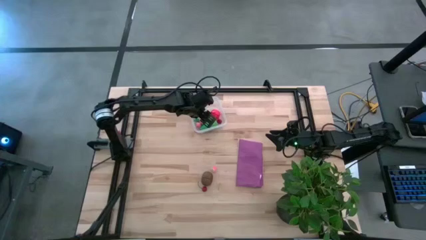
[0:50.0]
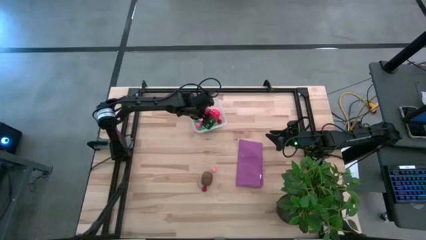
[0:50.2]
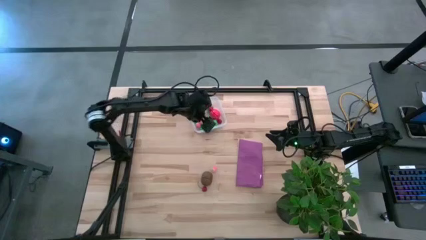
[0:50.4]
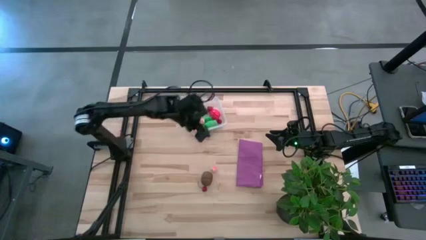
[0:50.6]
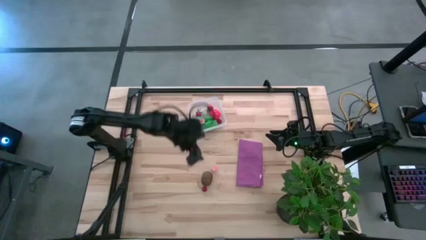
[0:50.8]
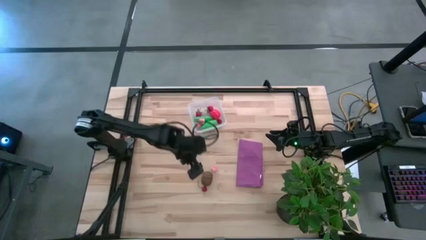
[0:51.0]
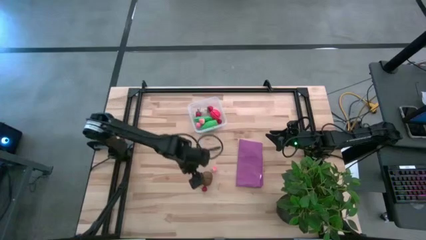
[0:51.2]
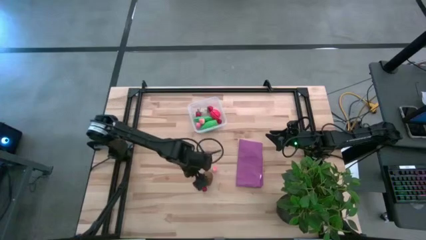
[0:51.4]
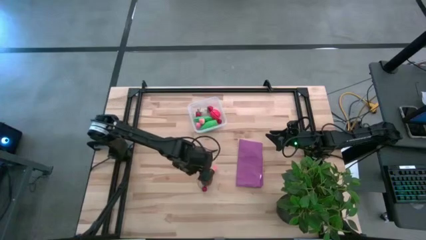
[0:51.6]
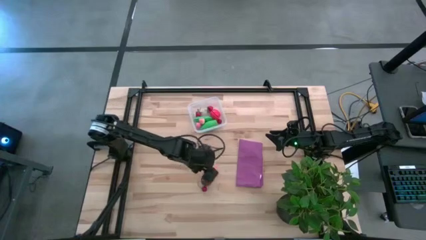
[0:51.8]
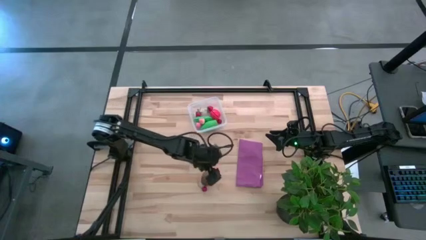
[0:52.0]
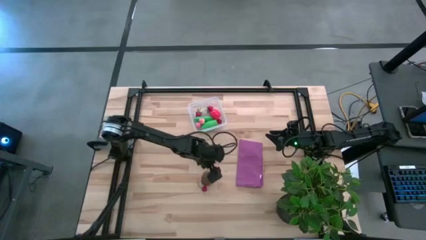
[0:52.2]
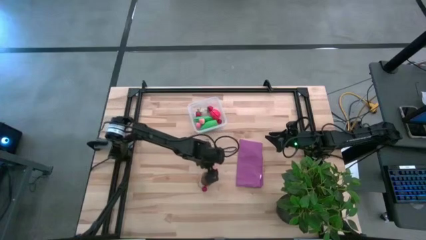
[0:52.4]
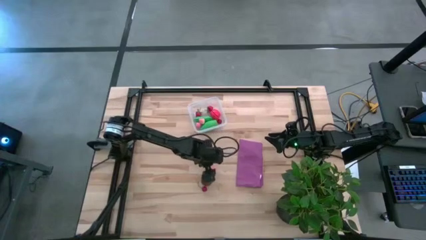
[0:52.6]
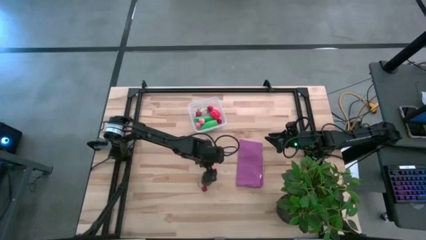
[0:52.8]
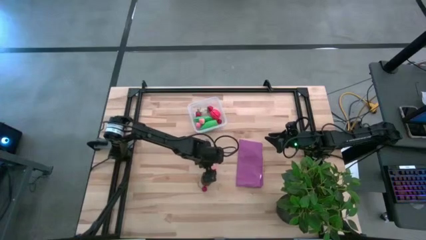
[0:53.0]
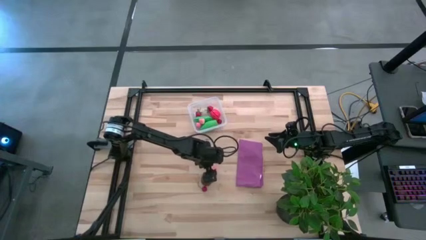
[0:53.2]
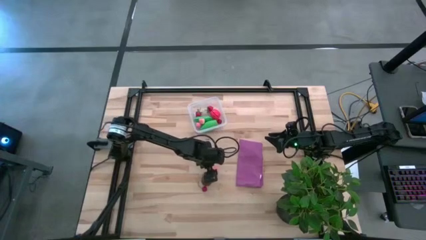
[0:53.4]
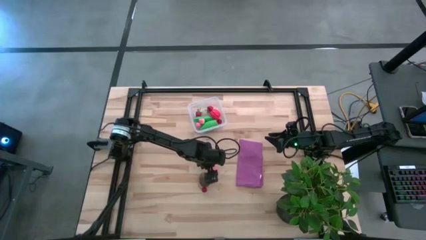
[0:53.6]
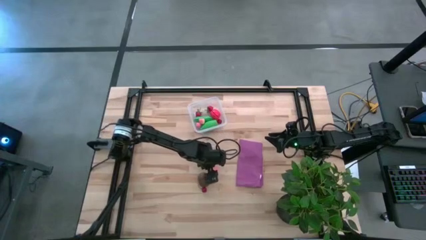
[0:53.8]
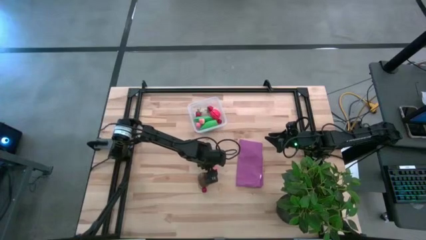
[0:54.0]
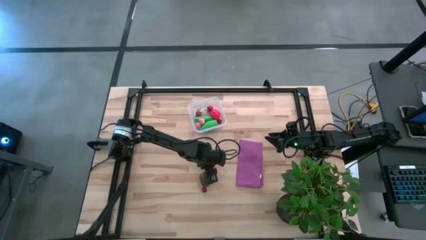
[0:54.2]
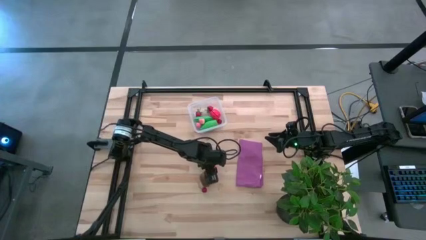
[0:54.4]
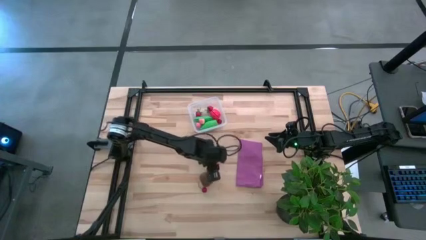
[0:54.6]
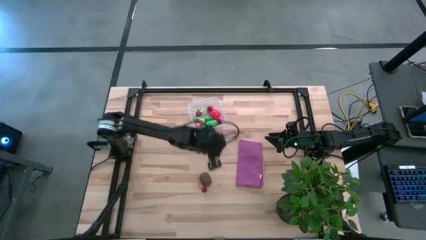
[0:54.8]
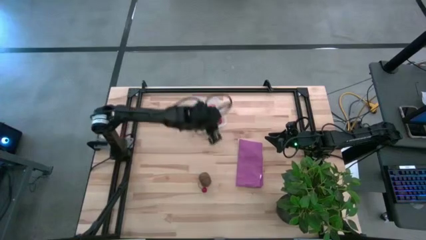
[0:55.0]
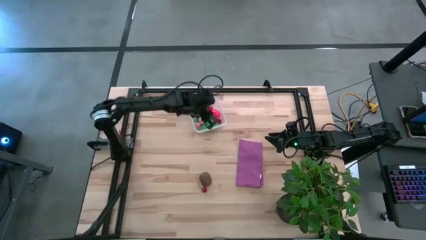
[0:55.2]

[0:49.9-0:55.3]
Task: Pick and placing Produce into tupperware
Put the pink peach into the white bin

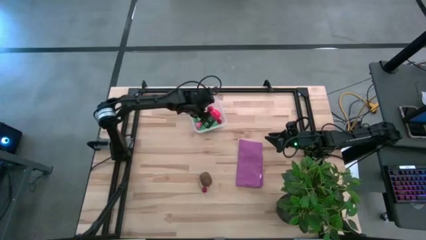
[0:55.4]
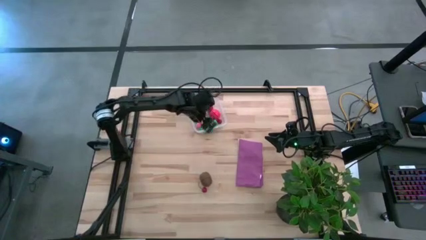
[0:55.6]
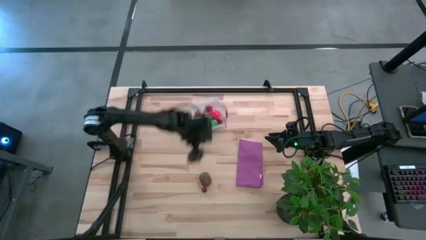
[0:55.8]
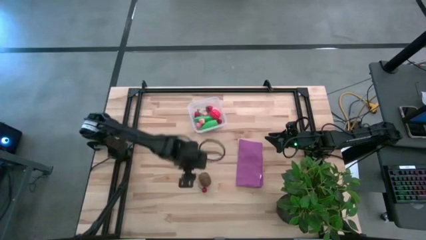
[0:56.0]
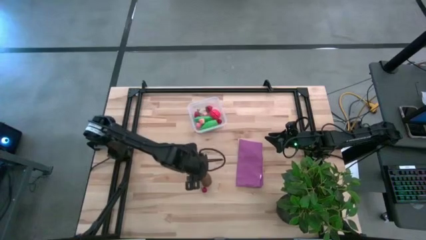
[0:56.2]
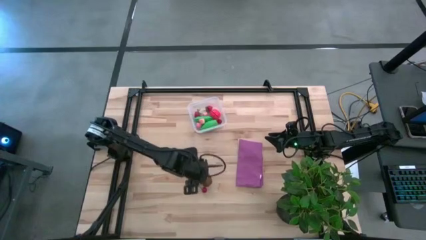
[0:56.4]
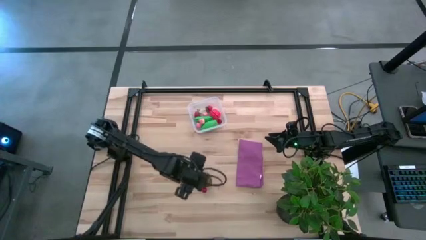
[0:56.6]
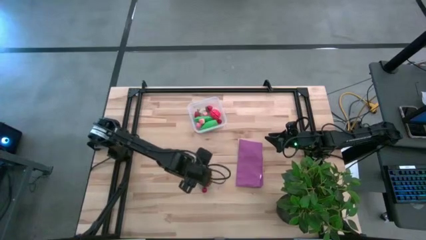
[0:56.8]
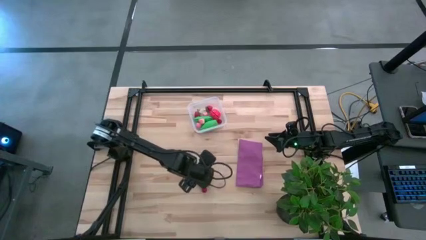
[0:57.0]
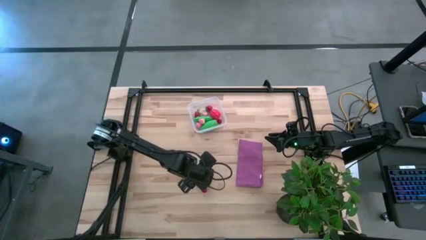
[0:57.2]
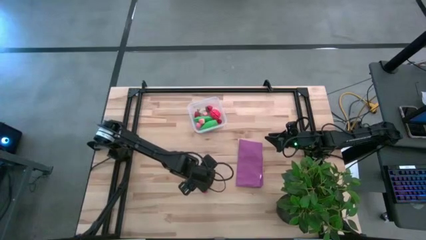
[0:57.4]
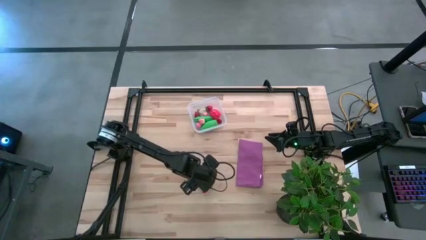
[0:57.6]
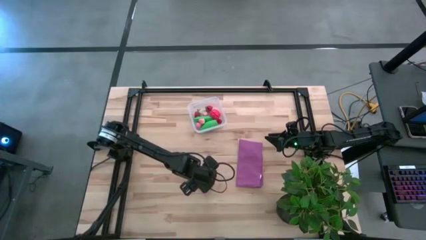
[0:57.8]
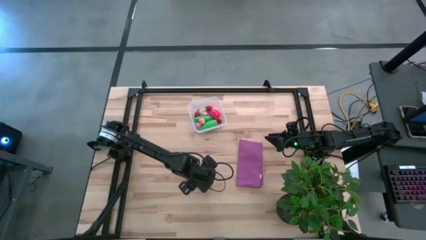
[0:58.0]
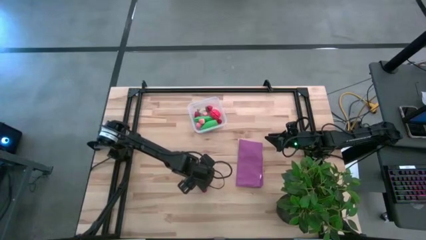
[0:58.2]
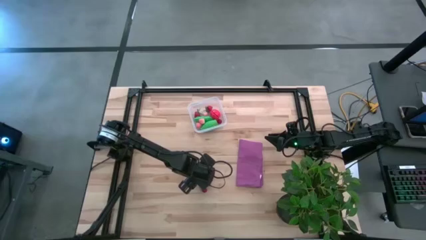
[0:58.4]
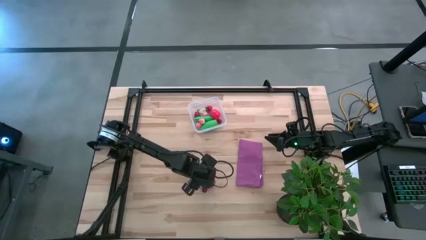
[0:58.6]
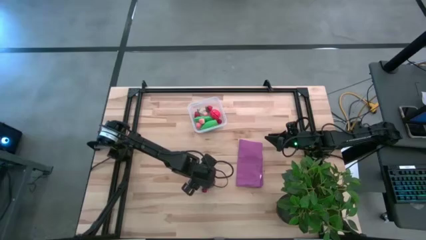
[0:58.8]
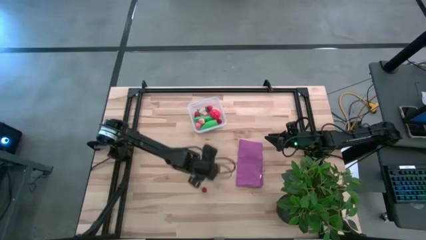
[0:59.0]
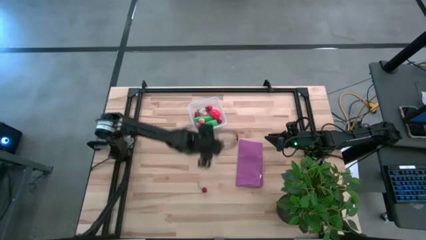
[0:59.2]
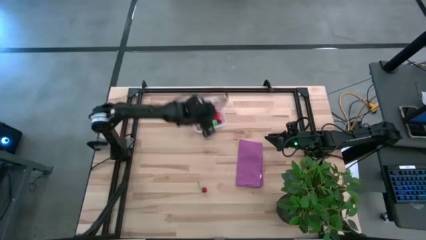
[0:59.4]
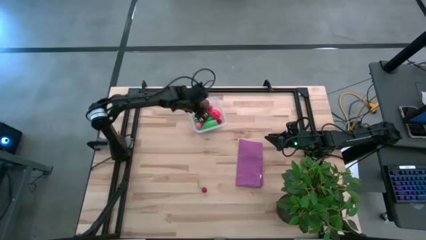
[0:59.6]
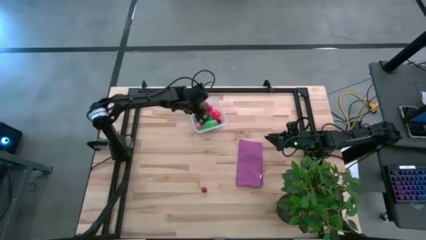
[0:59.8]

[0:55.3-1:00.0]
Put the brown kiwi into the white bin

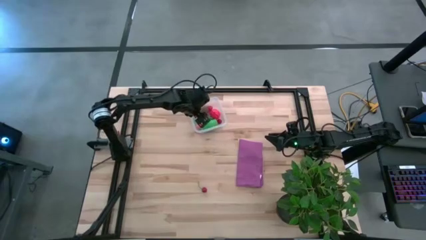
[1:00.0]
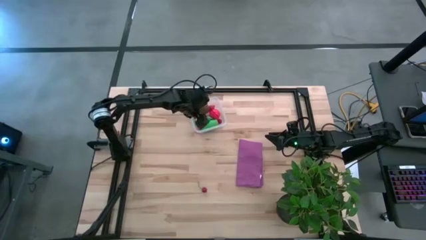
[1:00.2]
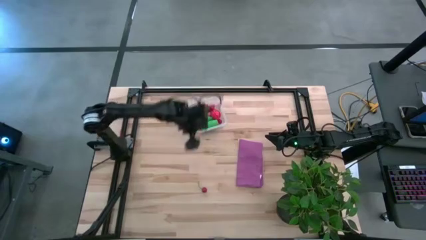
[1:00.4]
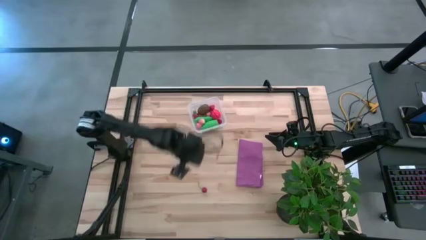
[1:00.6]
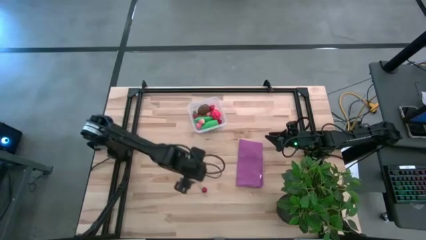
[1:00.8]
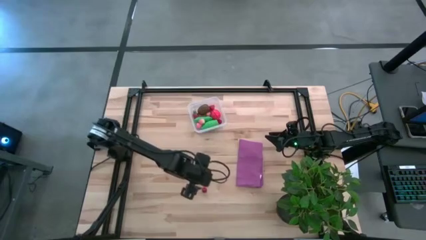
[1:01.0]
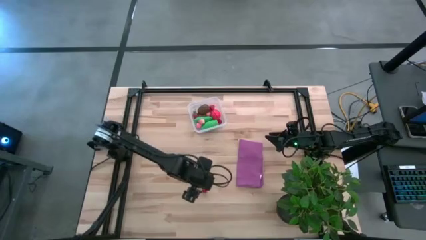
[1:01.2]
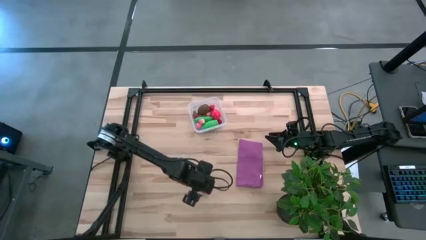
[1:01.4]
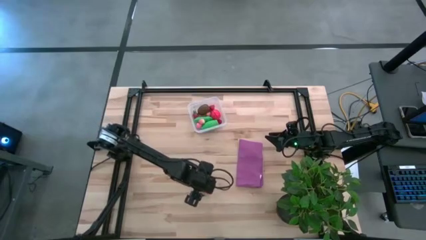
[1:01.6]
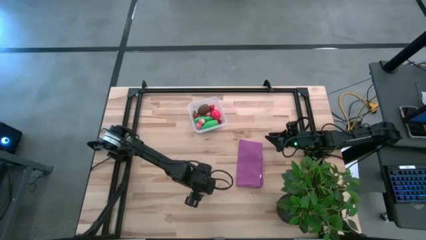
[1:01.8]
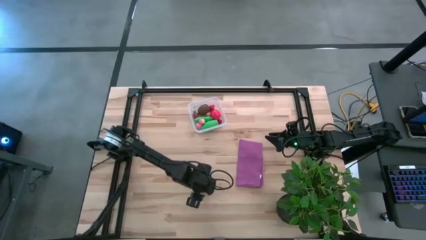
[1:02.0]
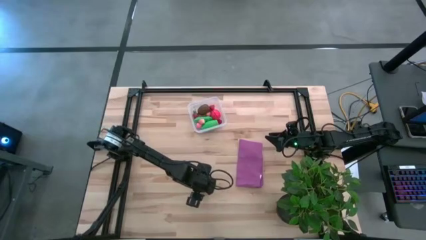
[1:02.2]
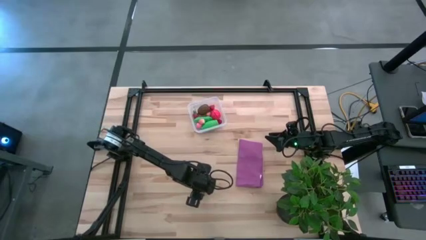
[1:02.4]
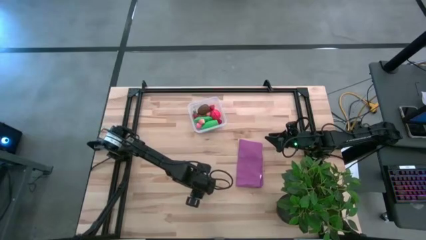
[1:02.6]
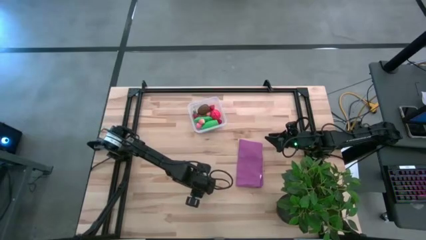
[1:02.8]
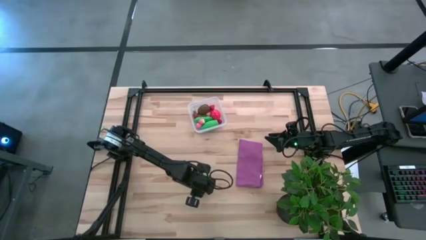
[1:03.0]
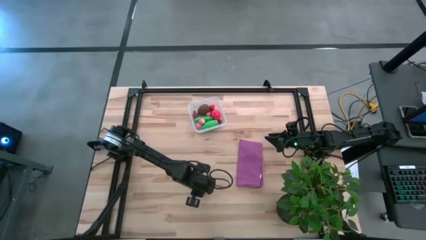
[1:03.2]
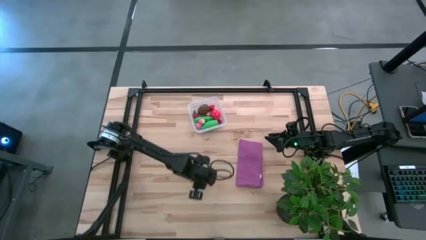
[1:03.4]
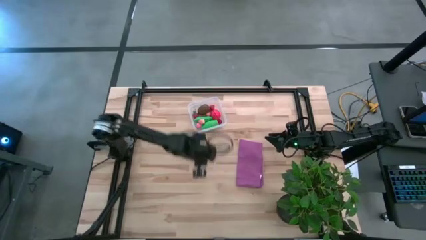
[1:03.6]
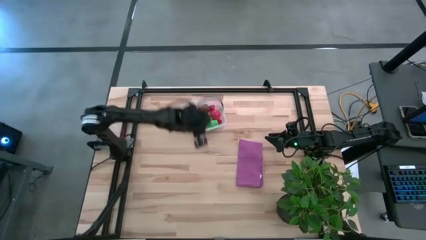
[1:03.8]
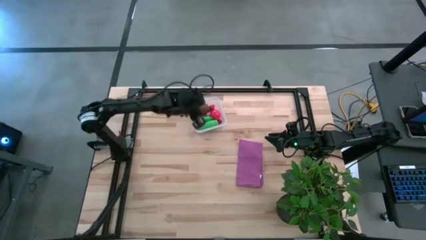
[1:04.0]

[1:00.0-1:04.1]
Put the red cherry into the white bin
